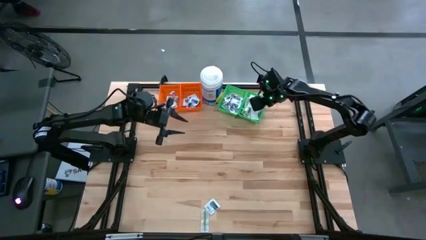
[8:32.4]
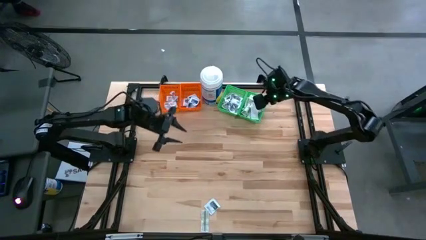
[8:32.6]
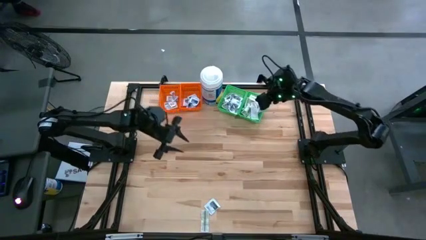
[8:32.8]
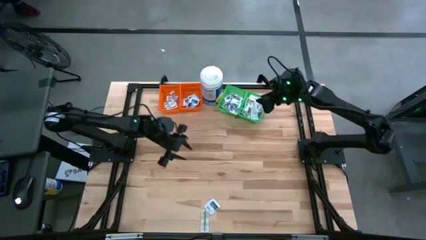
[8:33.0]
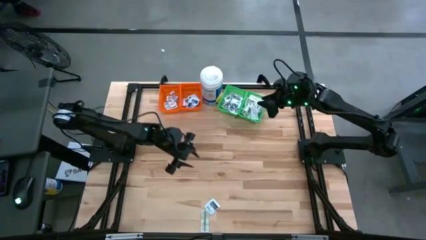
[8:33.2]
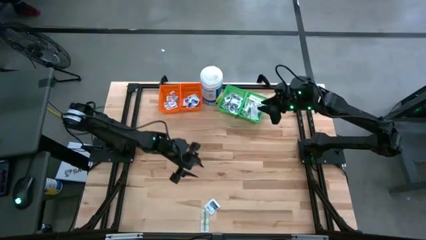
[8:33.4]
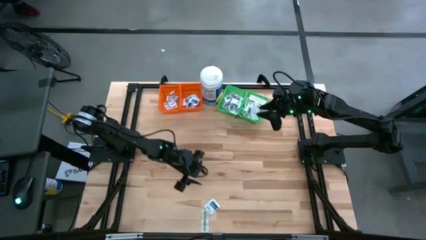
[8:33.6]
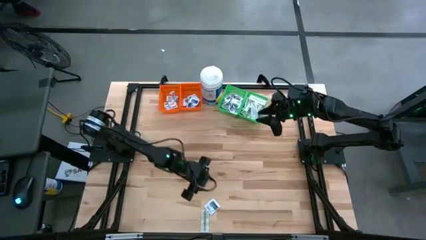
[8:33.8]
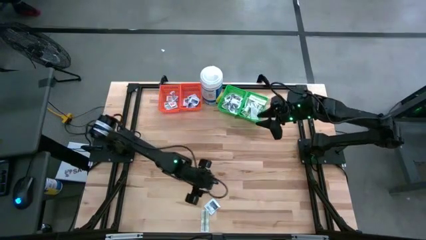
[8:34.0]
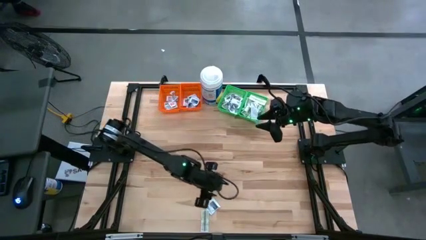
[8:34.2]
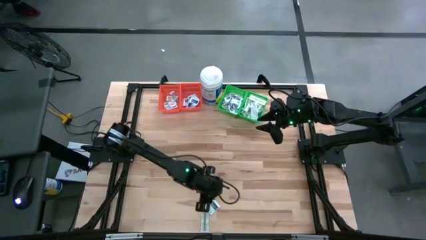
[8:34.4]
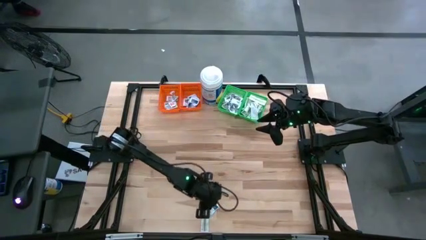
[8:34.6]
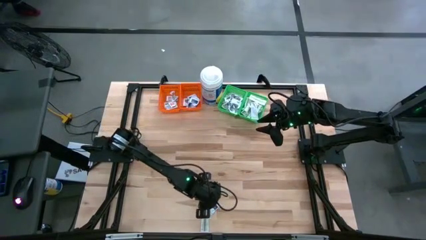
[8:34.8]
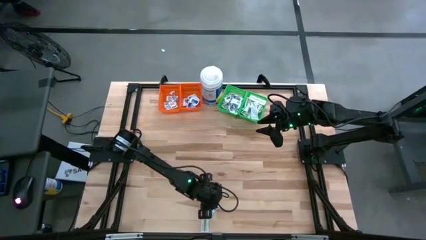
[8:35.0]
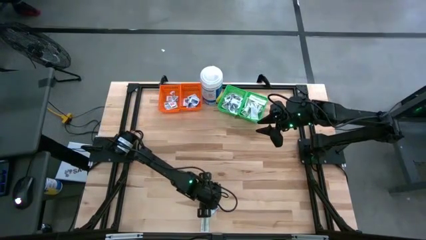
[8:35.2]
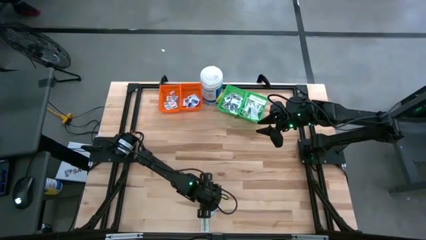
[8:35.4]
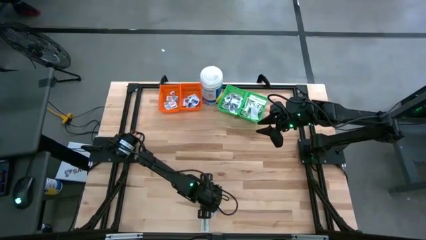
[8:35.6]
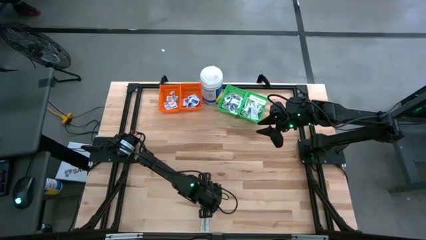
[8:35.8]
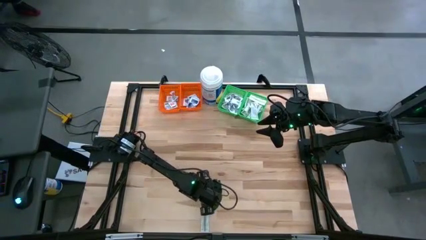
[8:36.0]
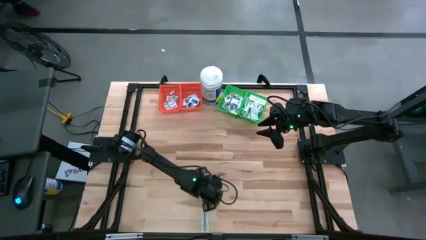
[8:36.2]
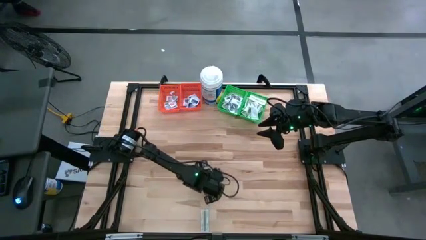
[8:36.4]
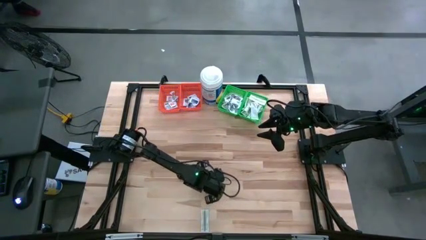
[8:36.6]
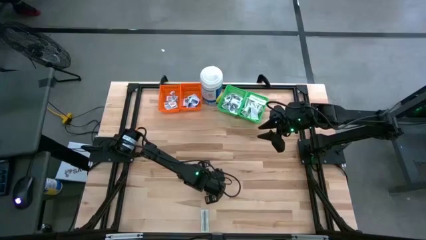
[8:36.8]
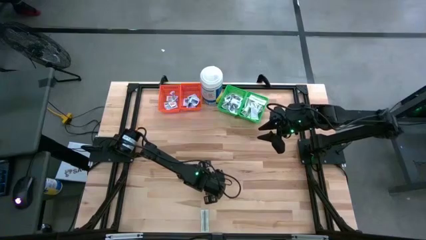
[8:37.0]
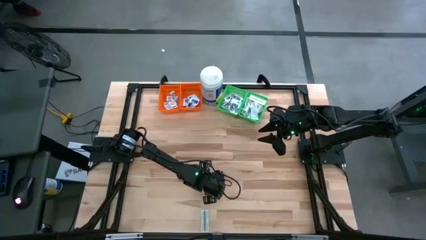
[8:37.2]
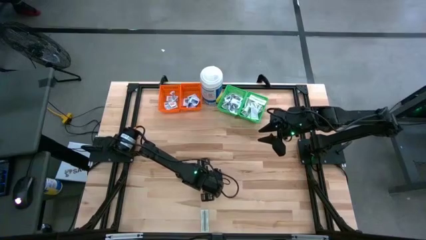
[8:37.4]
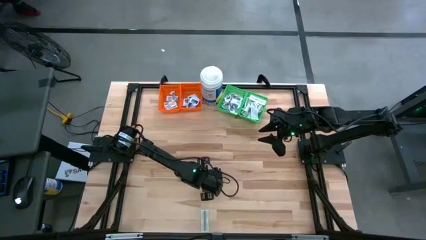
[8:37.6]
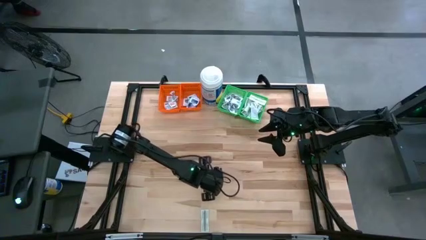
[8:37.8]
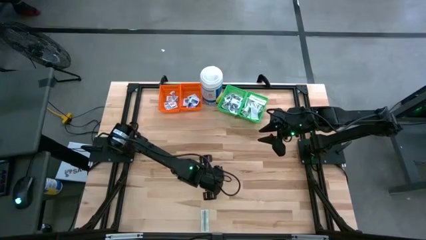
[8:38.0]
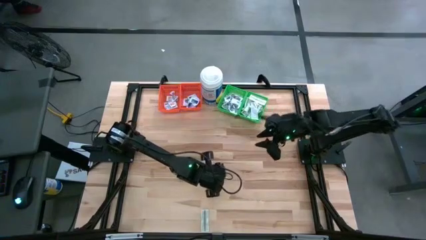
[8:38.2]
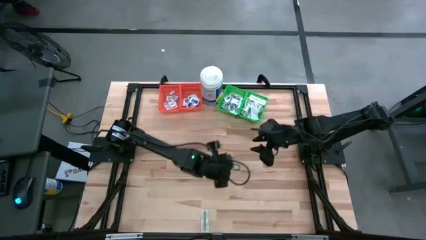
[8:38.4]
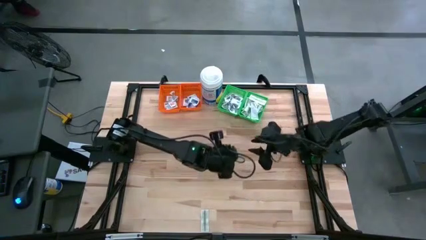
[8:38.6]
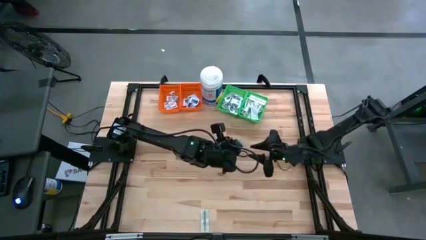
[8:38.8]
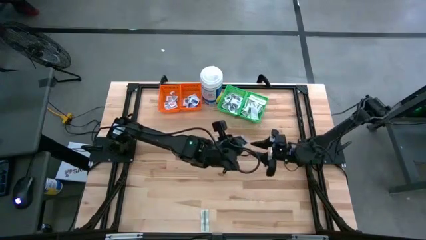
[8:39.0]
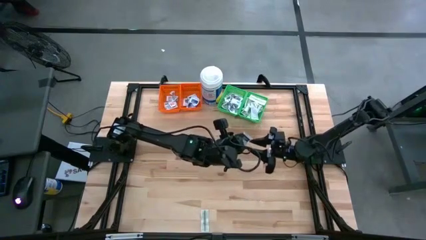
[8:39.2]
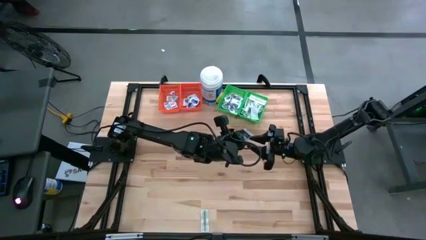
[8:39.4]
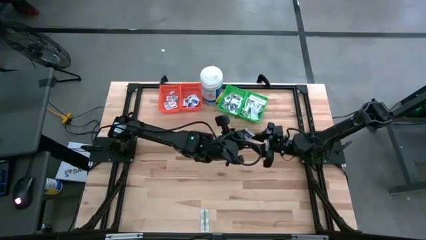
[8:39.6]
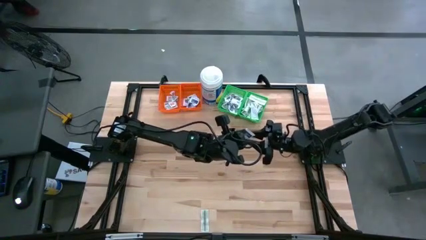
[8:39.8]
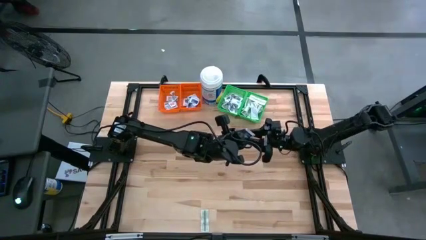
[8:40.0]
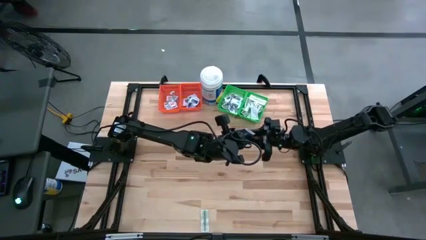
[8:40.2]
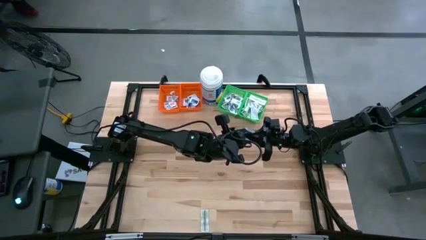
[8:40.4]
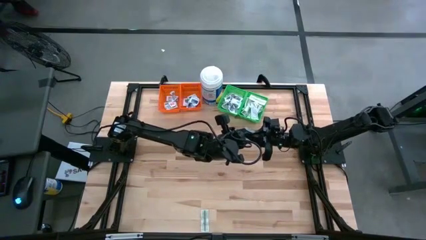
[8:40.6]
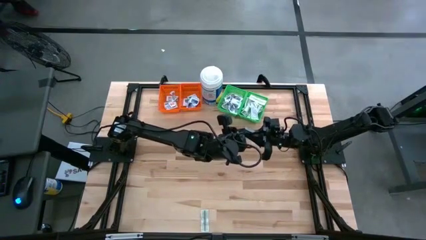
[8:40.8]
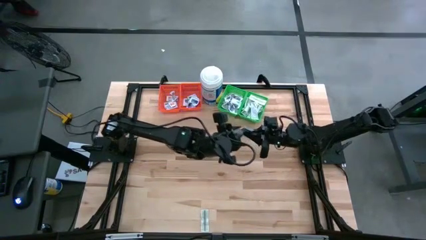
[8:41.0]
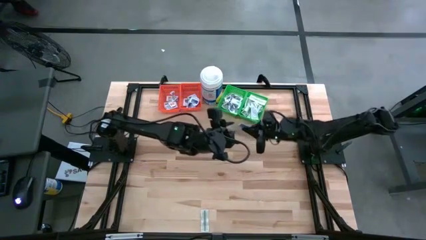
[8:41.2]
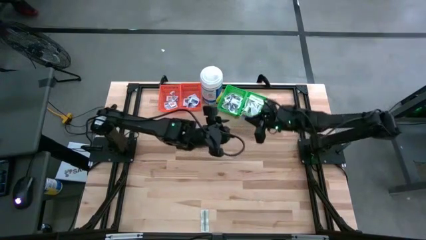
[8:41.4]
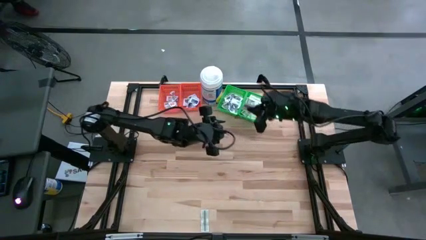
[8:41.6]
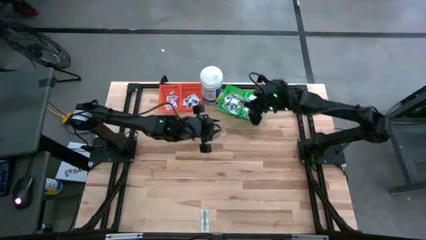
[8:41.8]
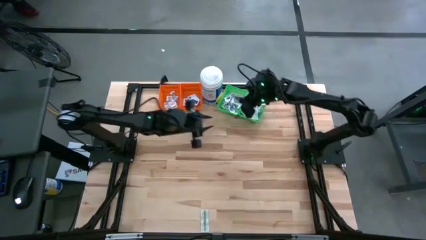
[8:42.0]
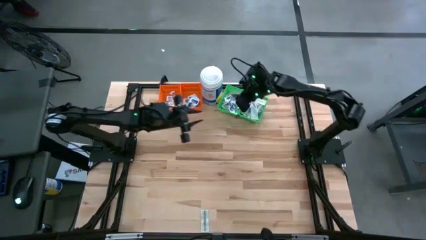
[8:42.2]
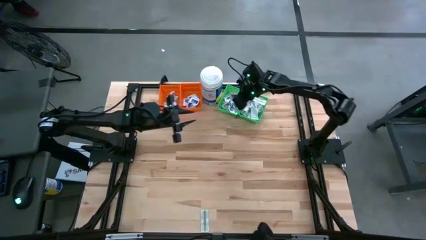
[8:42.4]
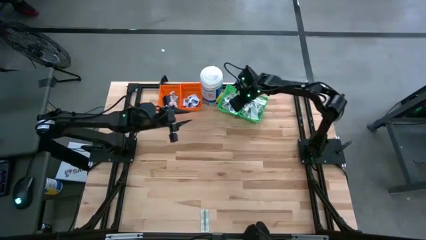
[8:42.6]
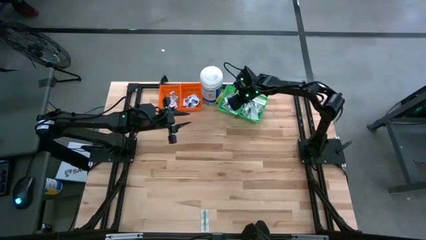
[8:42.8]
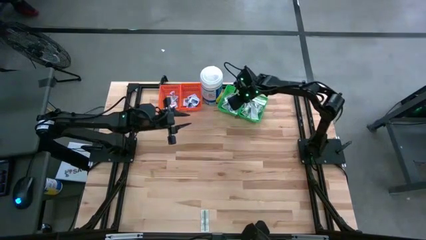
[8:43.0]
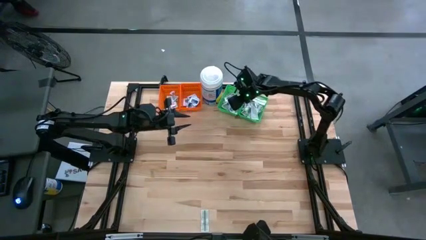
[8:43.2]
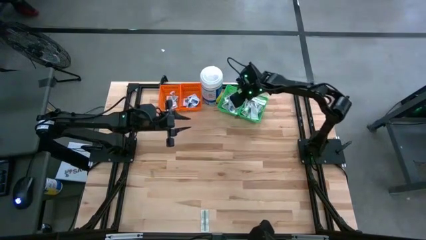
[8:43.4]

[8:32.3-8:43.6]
Task: Pick & Place First Aid Supplies
Put the black towelette pack into the left green bin
